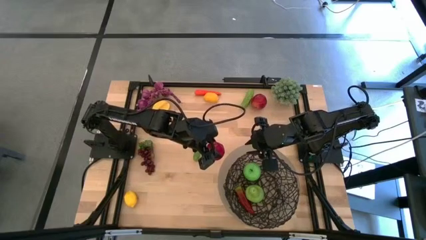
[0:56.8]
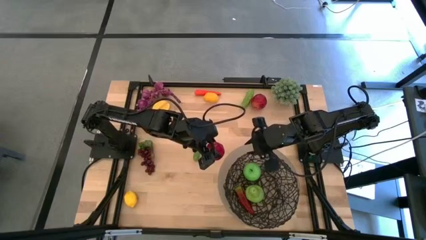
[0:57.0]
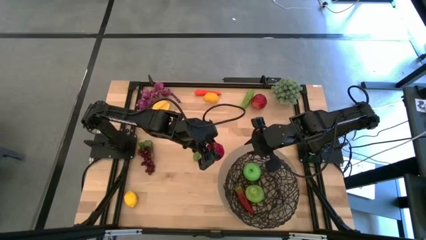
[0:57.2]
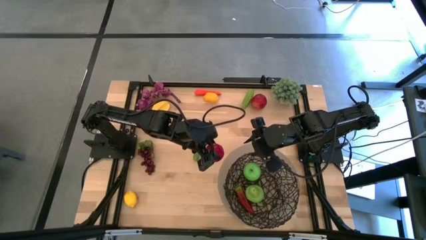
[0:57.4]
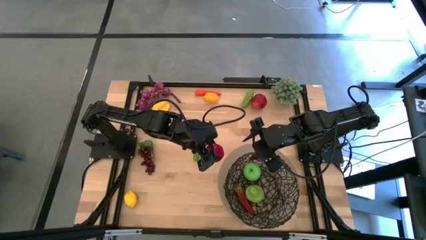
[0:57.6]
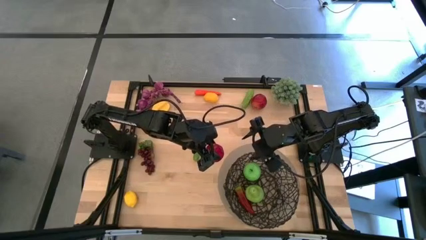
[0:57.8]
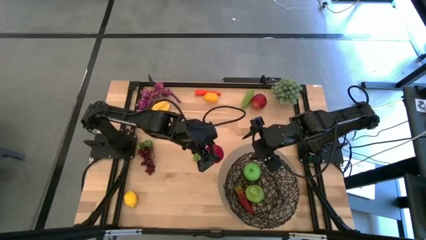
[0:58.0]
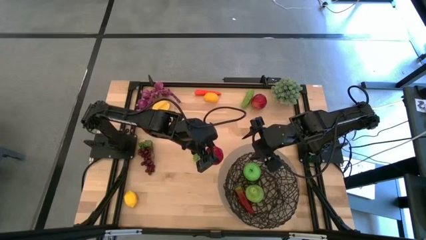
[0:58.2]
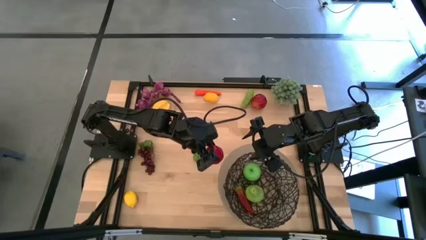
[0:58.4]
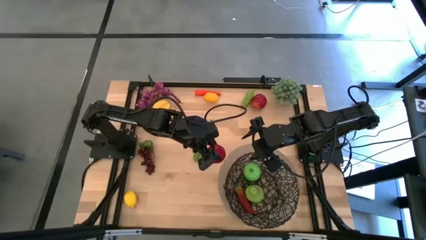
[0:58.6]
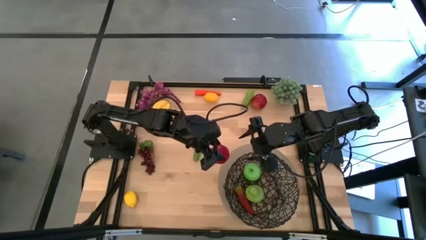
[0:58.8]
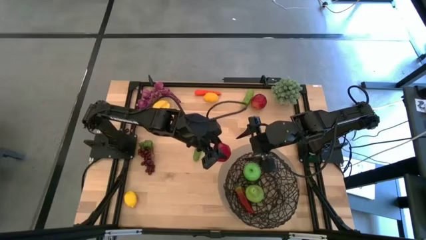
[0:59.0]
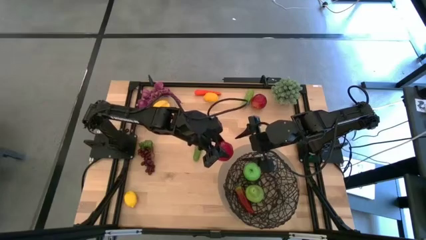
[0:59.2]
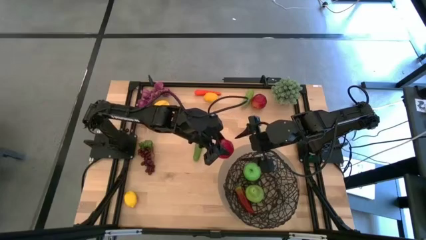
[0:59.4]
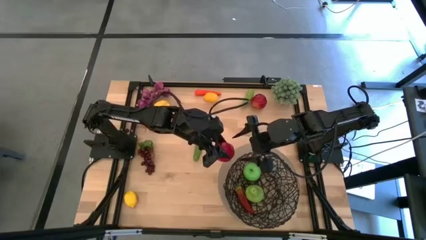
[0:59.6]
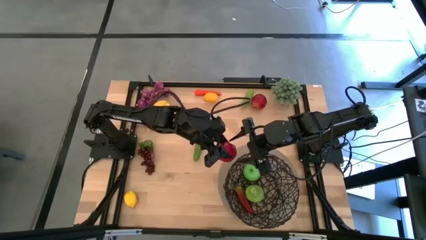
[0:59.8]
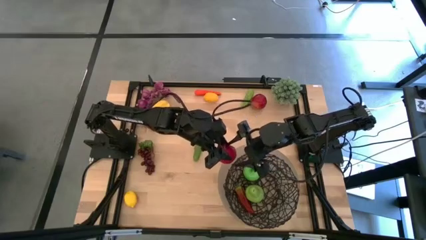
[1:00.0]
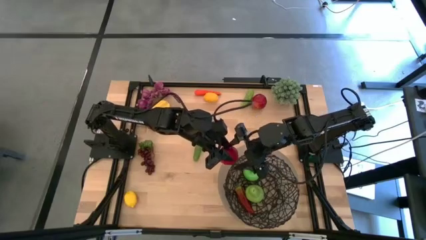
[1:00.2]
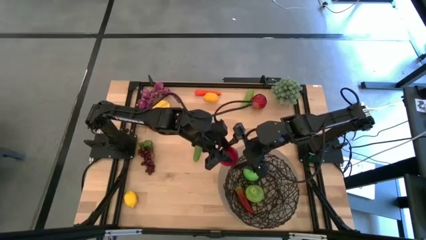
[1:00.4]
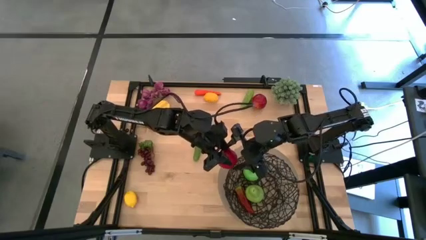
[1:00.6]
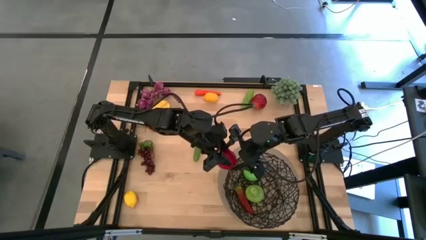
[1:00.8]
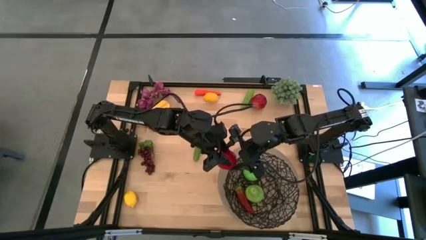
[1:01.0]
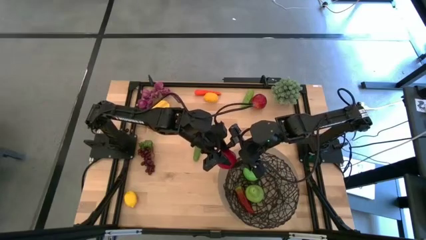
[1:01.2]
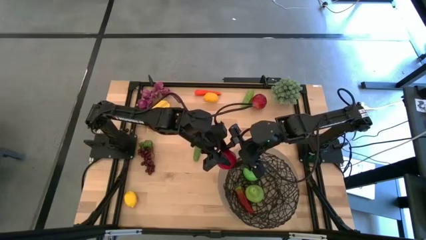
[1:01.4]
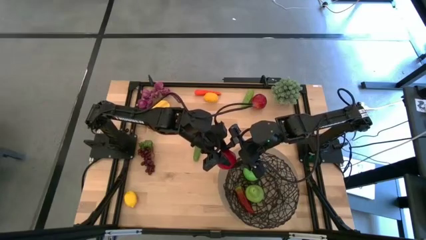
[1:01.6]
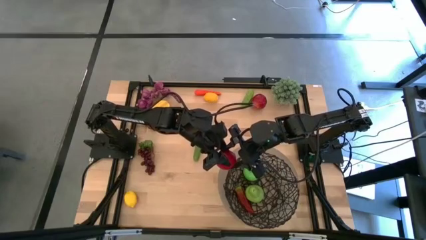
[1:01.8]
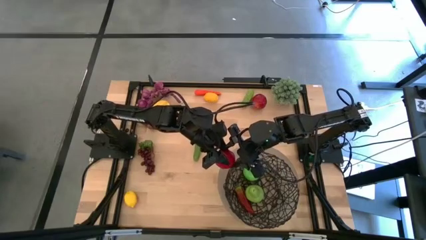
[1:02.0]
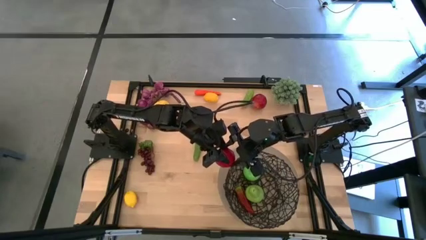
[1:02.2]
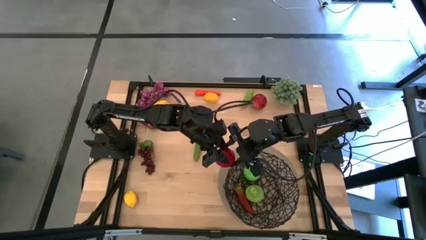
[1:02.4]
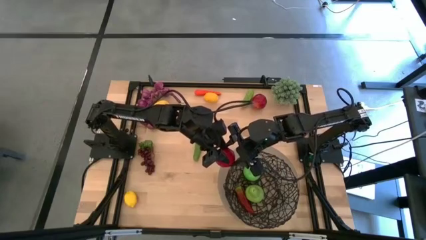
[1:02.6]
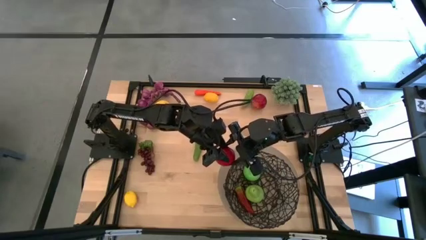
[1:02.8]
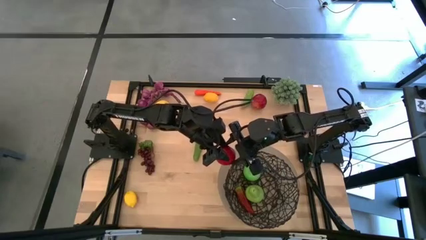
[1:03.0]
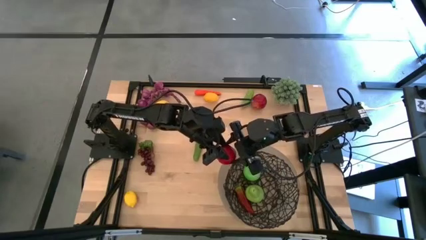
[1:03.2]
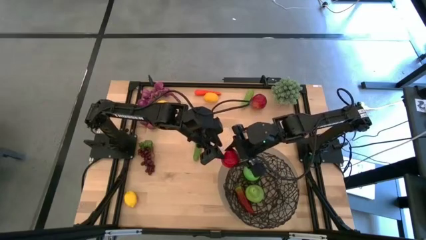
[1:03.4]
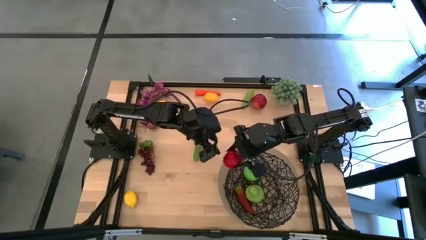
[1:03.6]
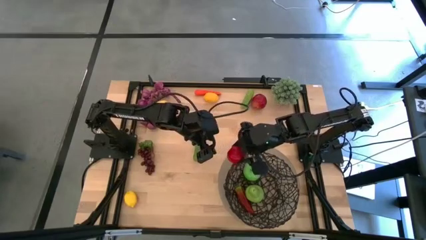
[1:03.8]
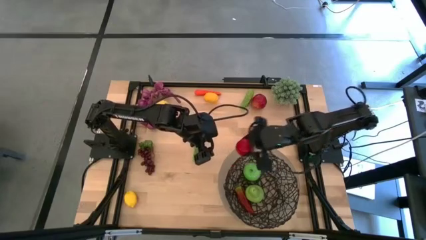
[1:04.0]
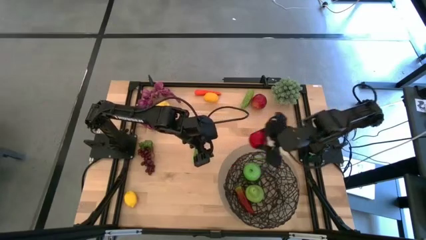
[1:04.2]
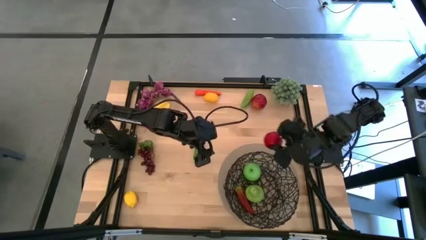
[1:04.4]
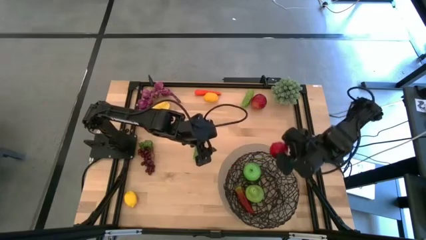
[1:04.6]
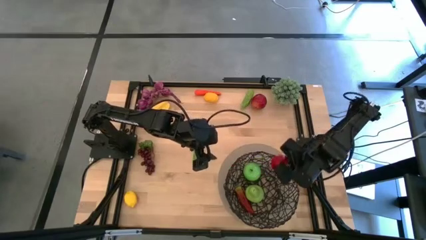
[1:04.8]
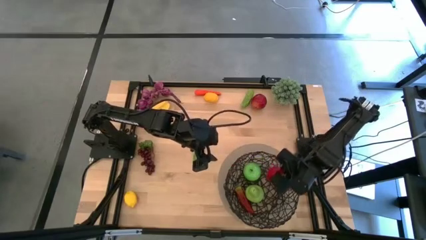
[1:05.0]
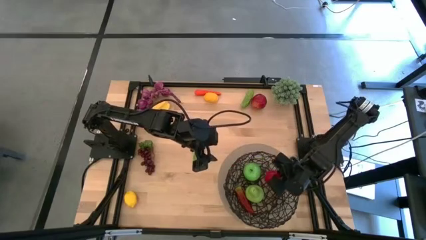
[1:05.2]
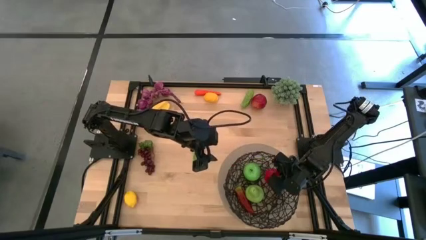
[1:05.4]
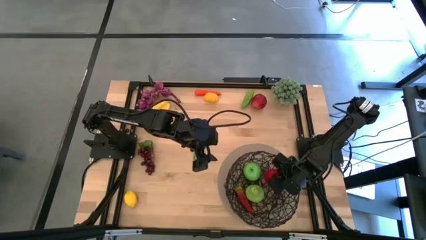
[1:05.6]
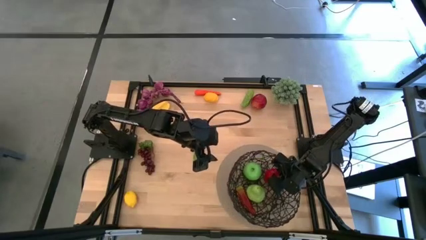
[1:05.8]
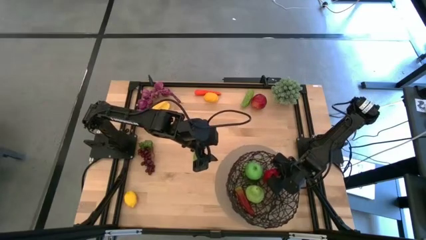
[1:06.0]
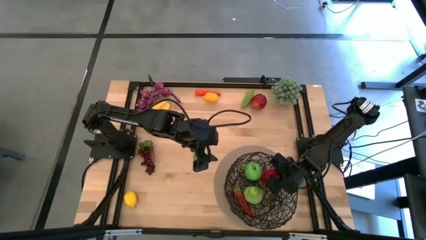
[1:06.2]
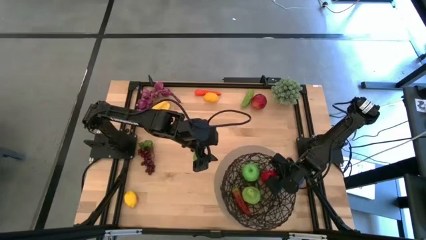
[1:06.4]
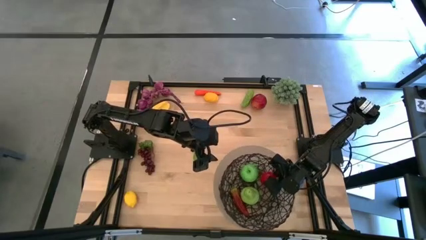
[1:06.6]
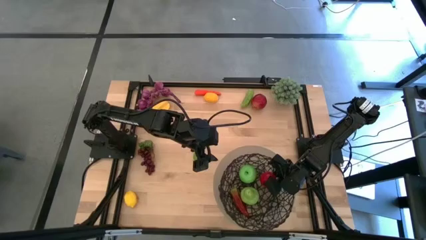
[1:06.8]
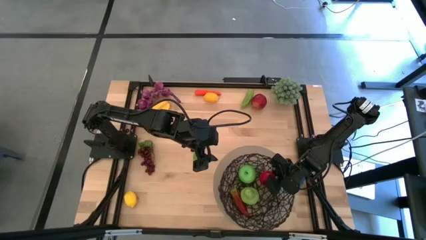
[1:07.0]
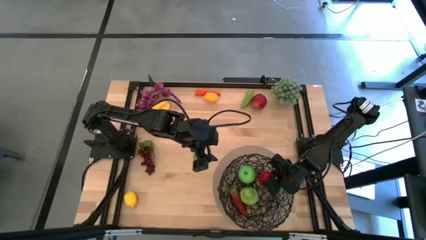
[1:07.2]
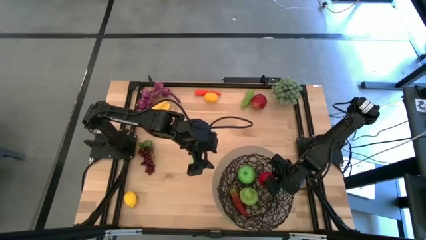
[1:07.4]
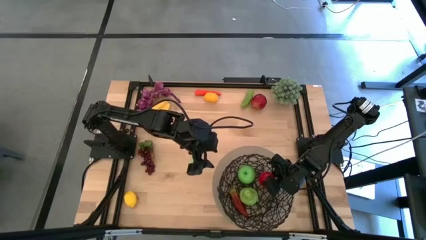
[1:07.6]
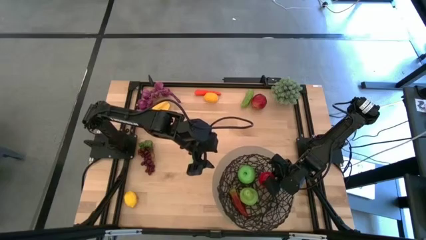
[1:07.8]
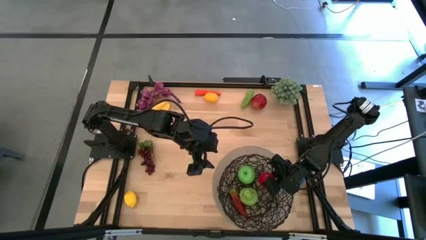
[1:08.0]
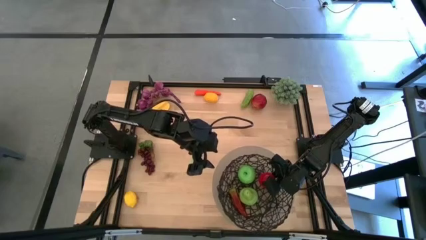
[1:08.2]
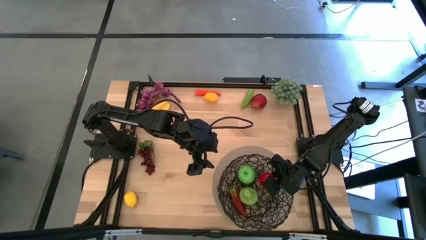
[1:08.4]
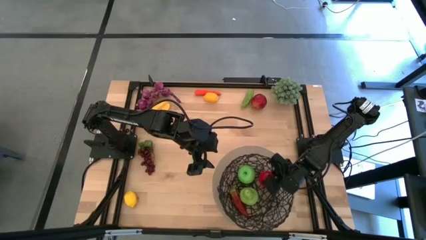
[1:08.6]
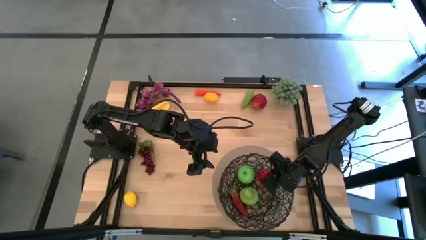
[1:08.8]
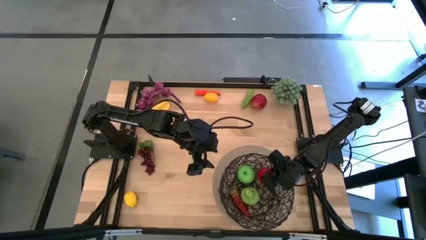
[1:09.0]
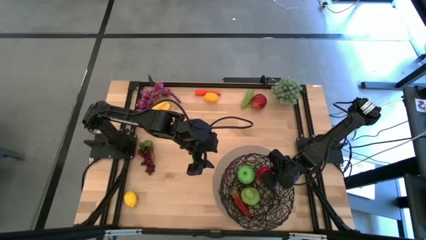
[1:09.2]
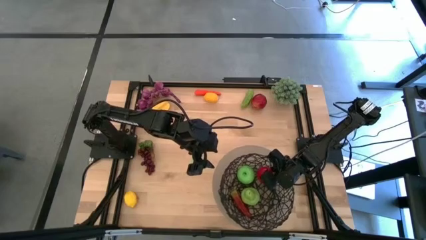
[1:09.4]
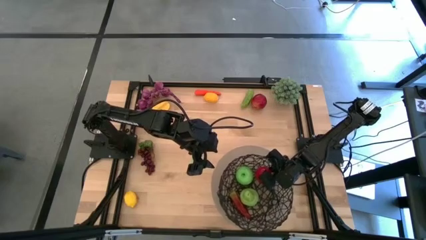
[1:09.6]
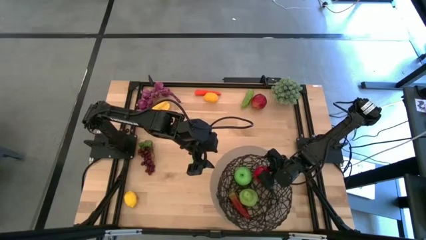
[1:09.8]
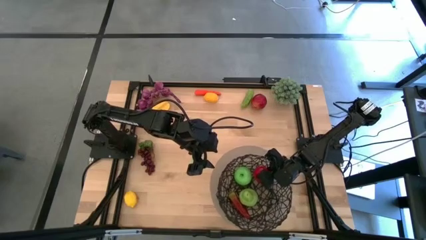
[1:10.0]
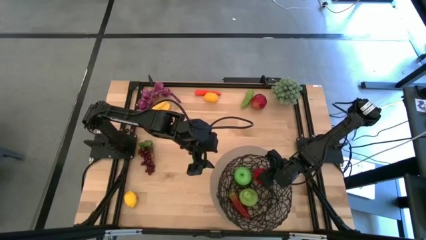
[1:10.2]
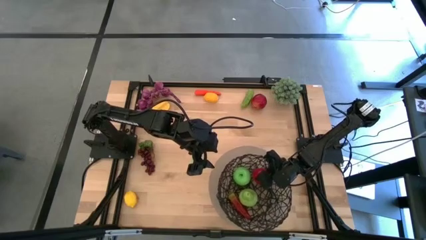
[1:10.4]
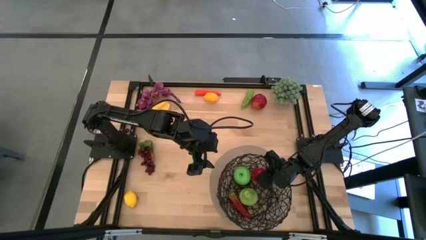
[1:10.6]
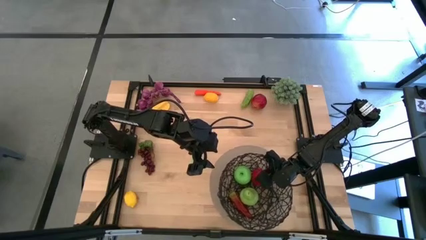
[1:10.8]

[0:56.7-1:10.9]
Task: Build produce basket
Put the red tomato into the wire basket

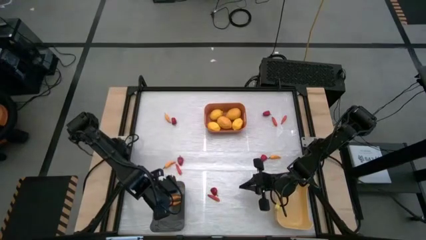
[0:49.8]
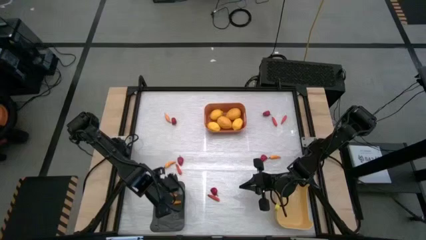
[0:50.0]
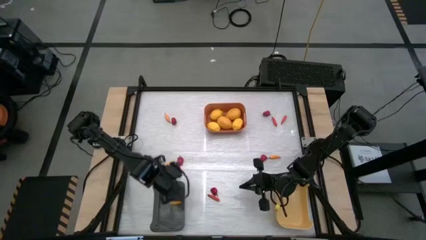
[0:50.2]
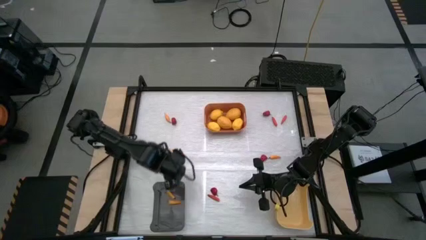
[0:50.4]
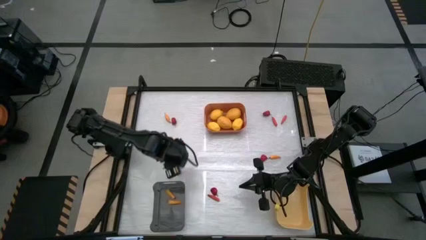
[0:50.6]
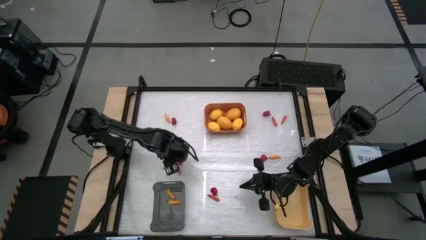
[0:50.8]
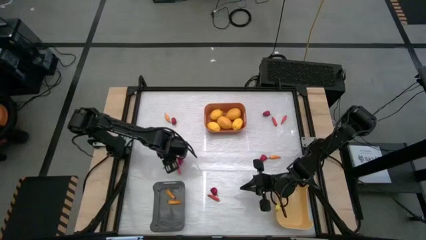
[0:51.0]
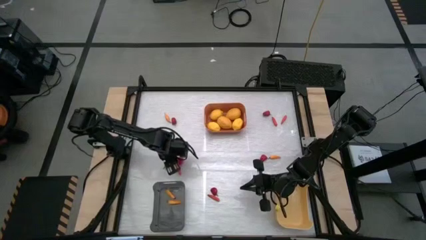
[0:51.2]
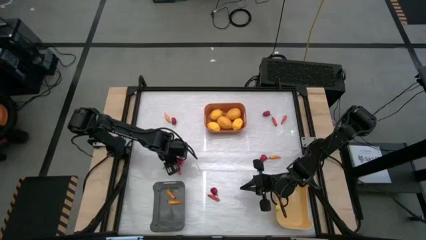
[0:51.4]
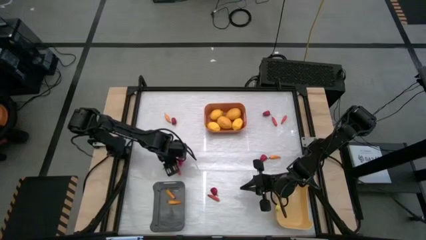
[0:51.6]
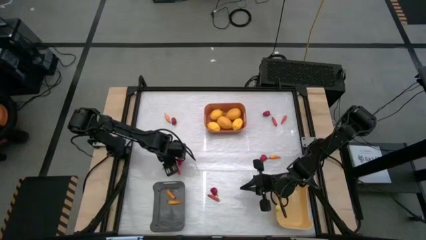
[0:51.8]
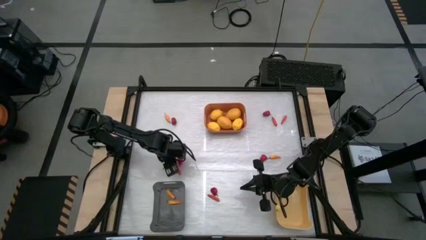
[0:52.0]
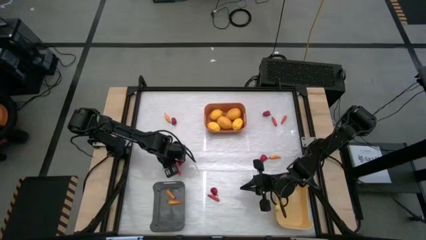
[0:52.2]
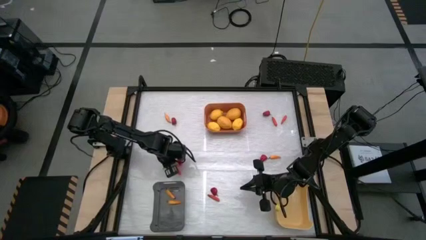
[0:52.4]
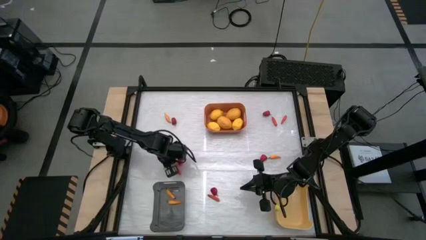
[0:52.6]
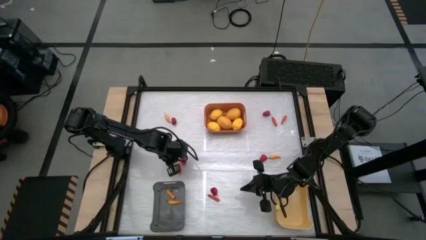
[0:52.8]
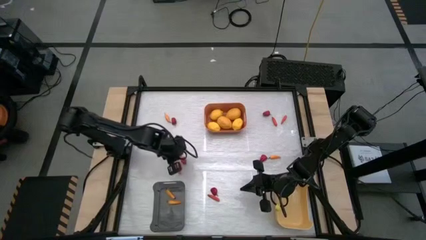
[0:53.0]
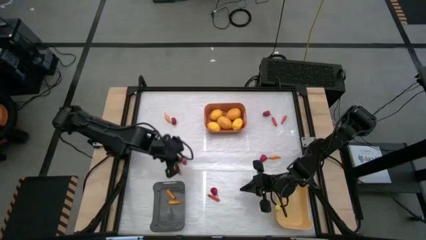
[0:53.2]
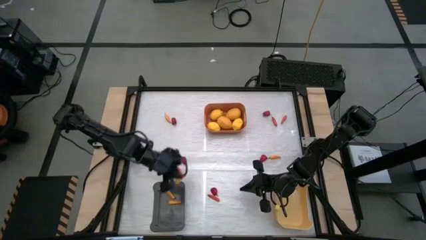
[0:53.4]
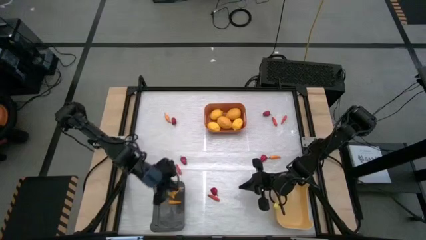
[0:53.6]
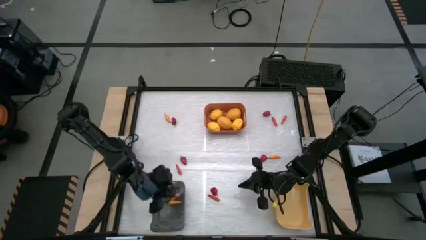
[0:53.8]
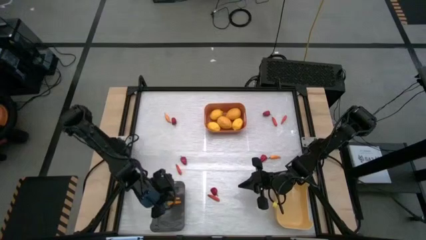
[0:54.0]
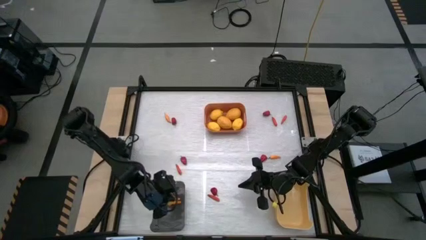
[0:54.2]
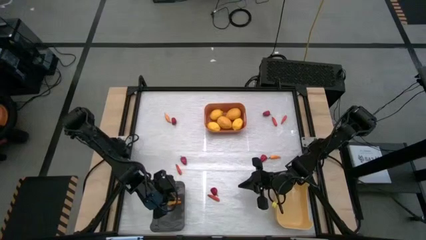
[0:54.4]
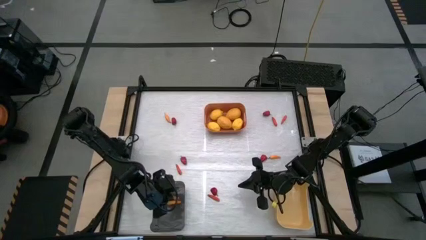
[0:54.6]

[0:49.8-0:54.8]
Task: Sort produce into baskets
Put the yellow chili pepper into the black bin
